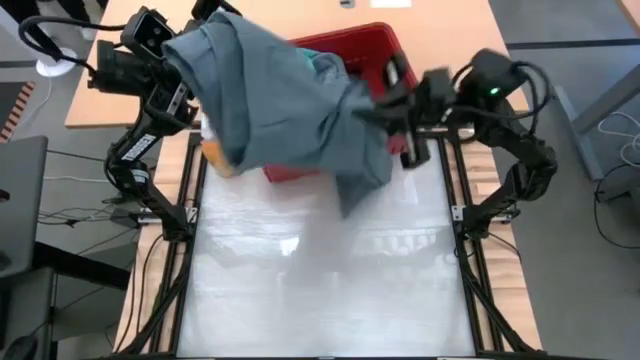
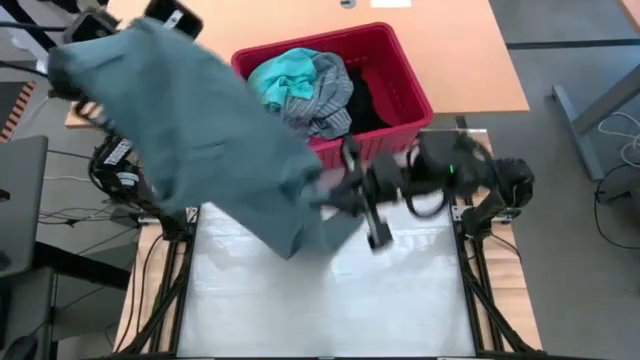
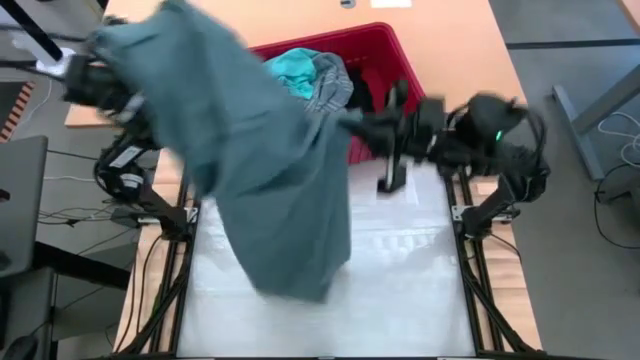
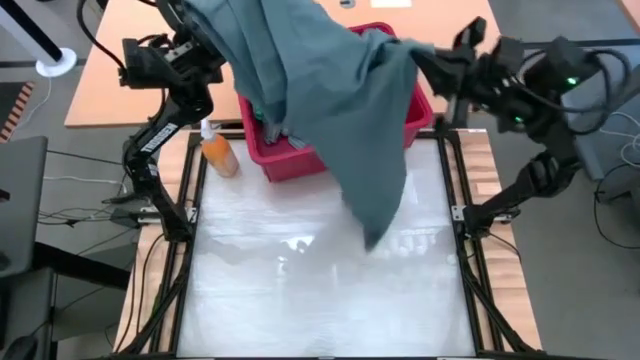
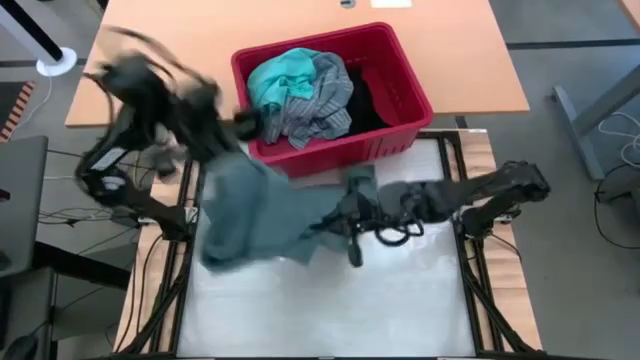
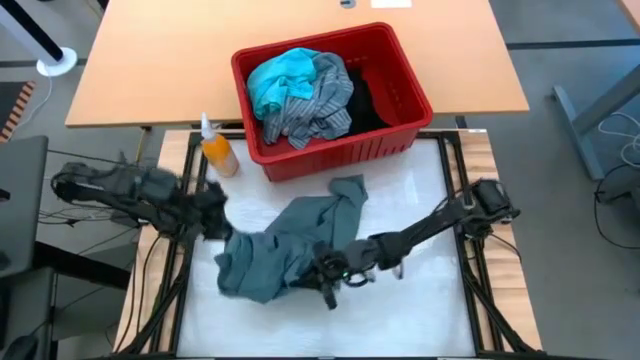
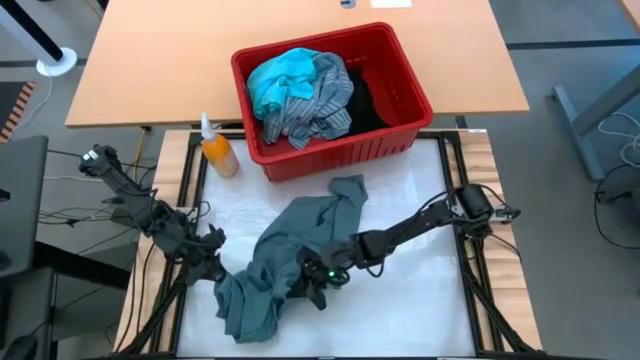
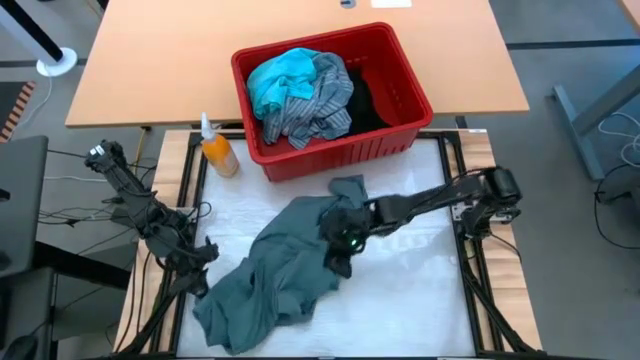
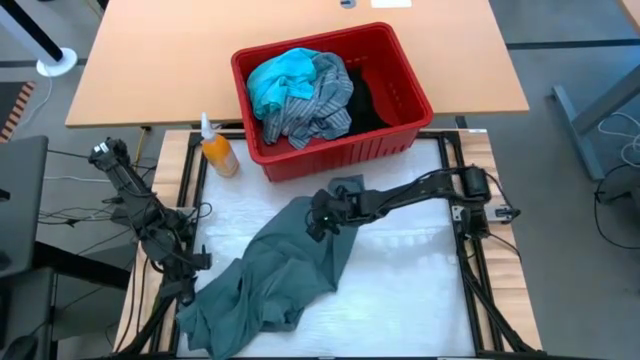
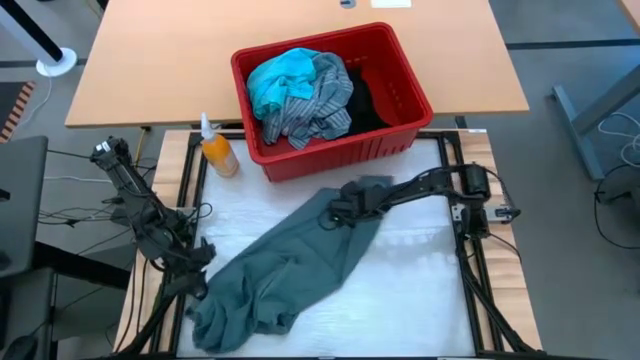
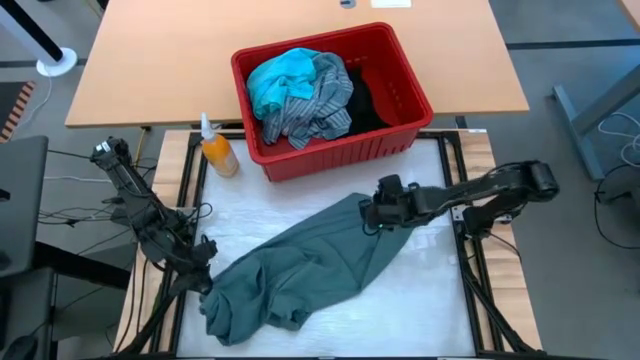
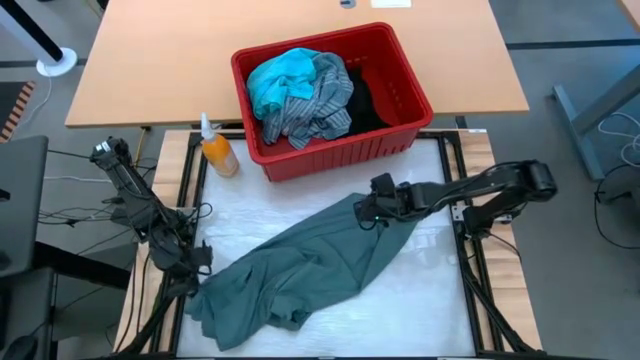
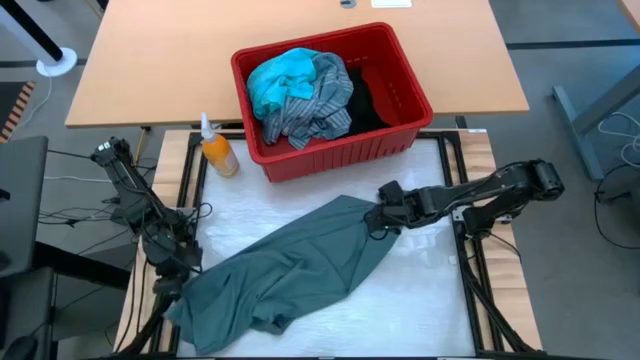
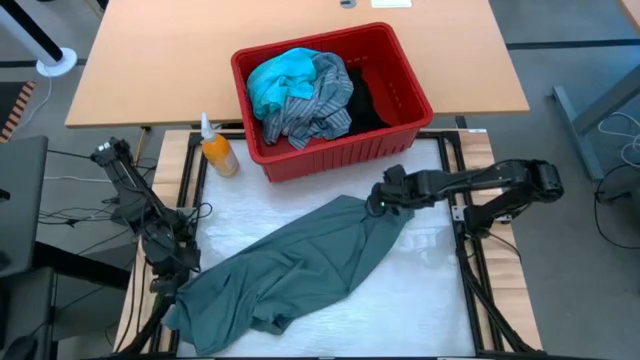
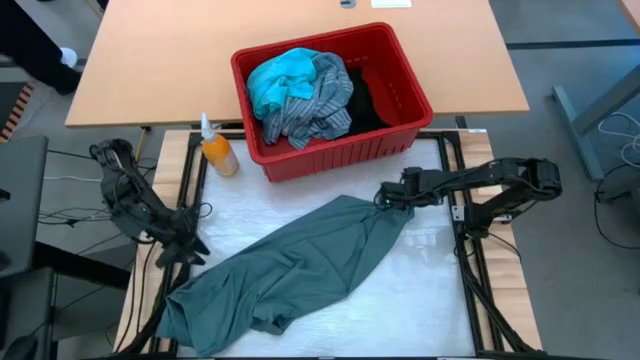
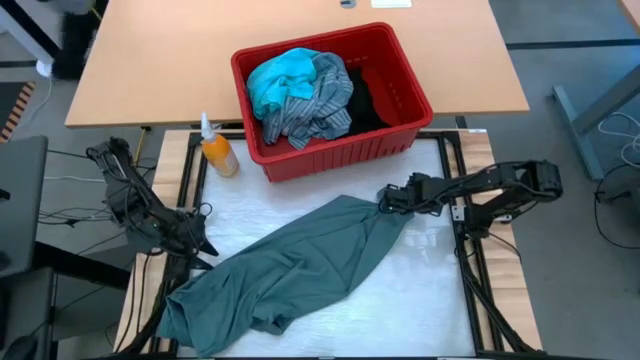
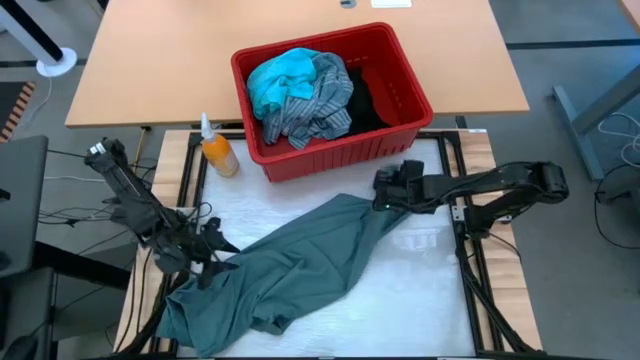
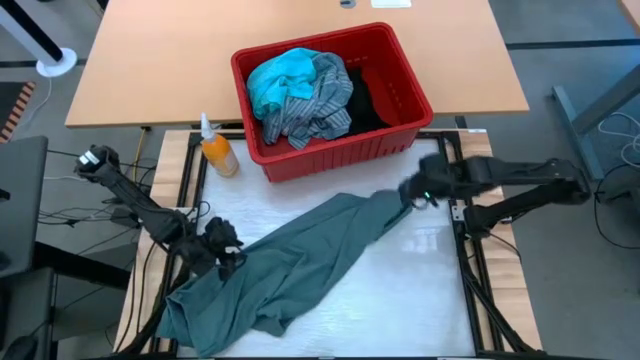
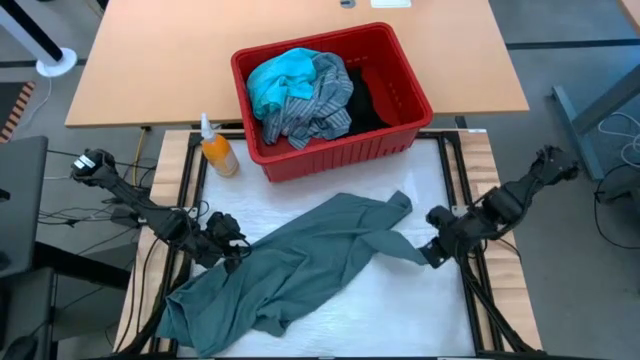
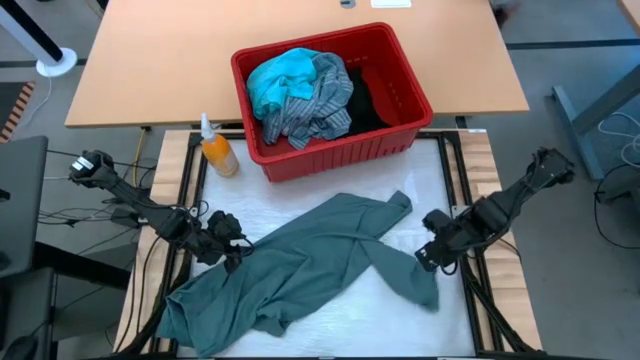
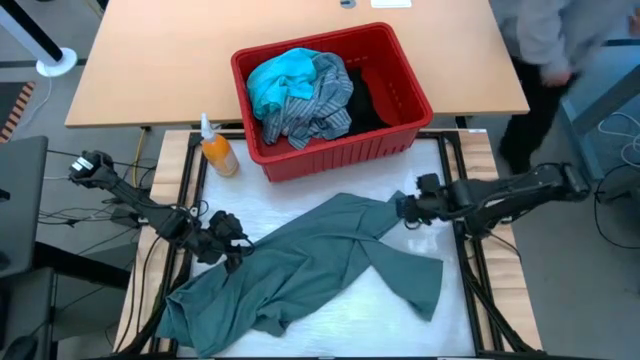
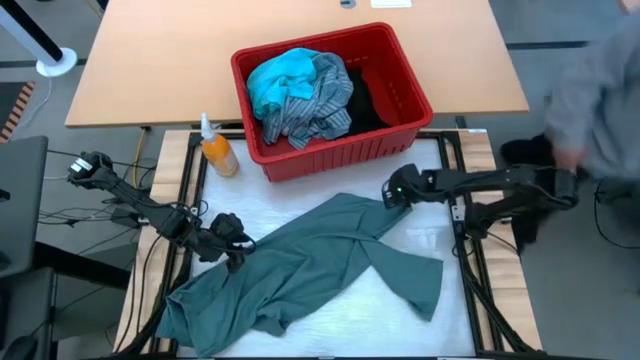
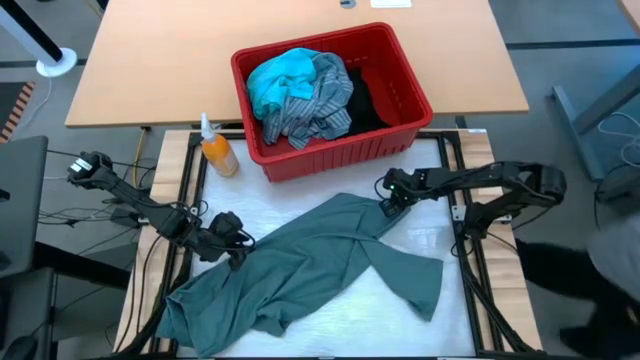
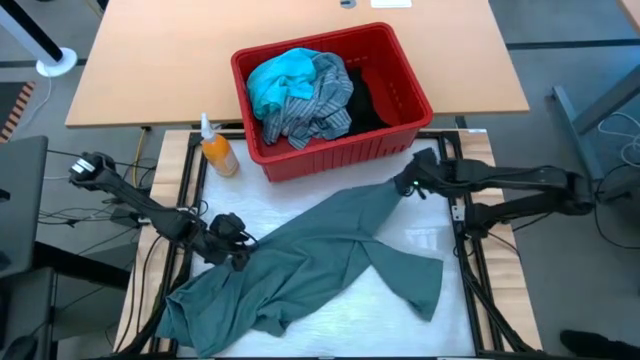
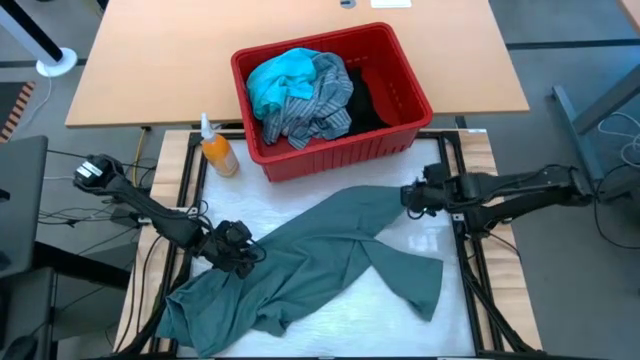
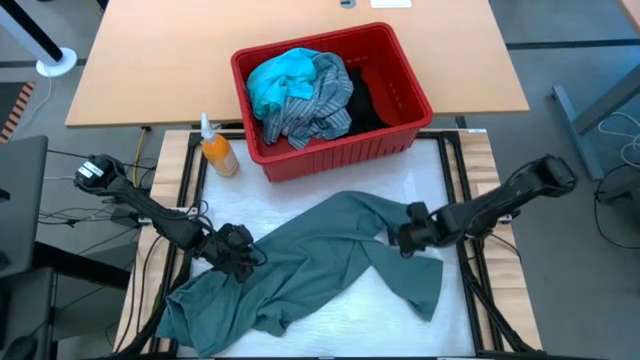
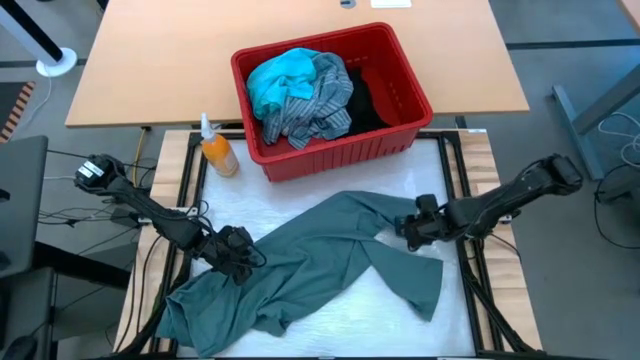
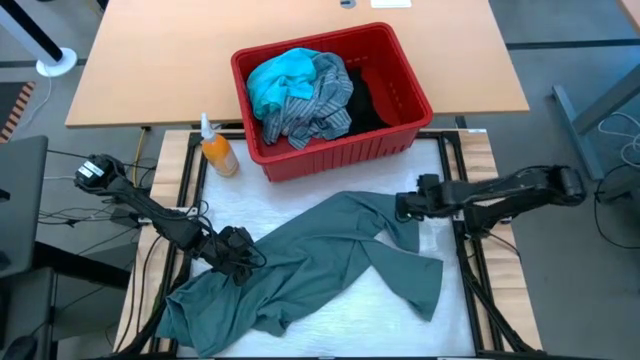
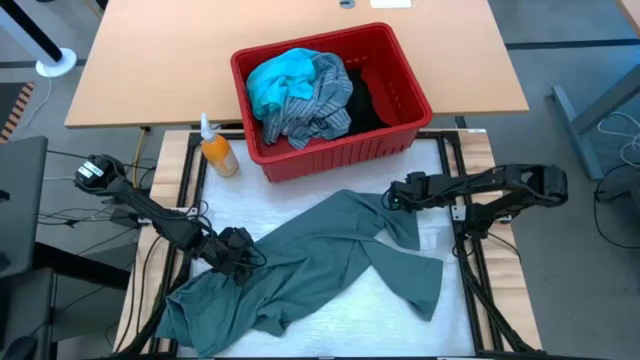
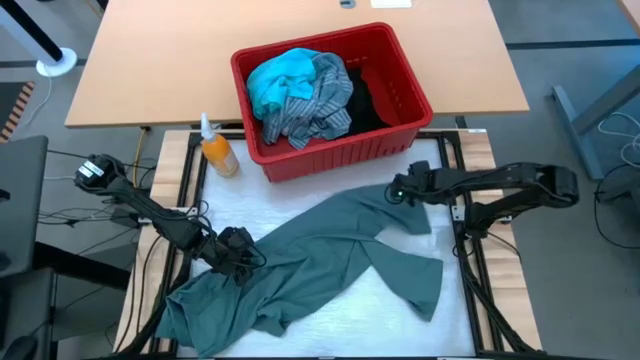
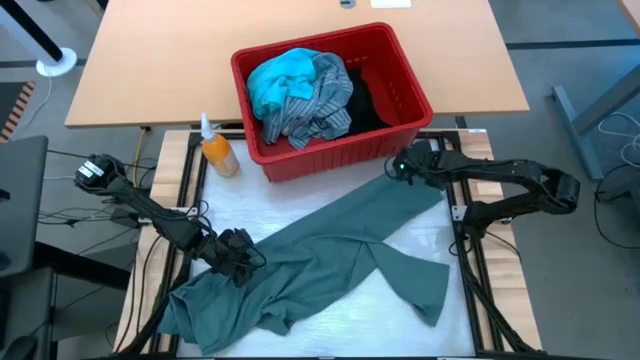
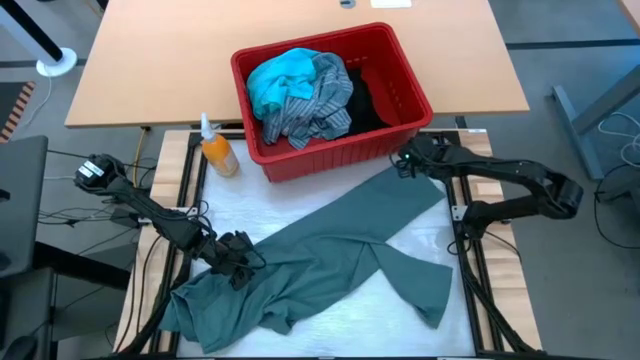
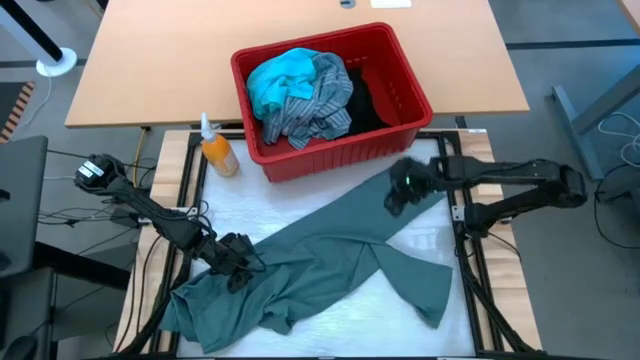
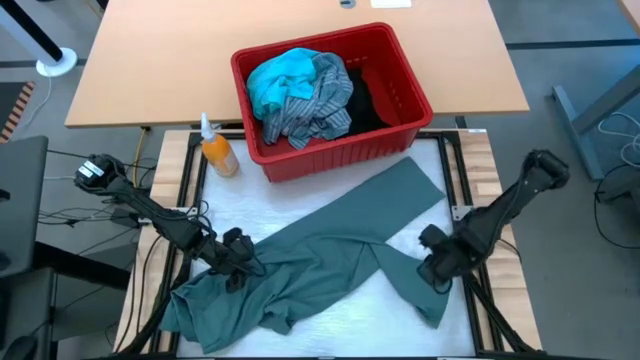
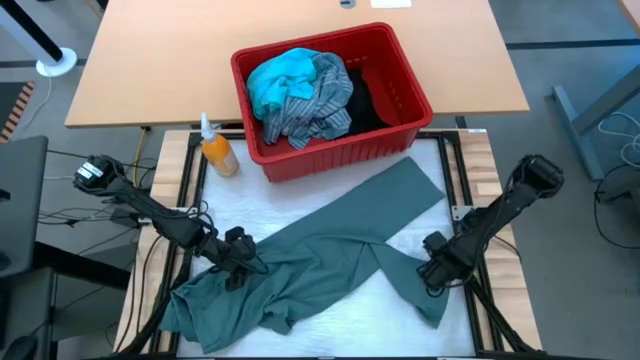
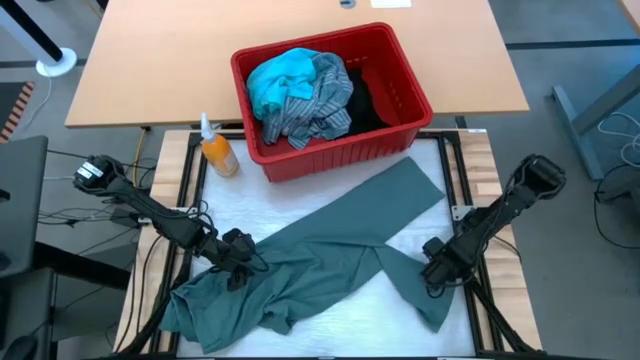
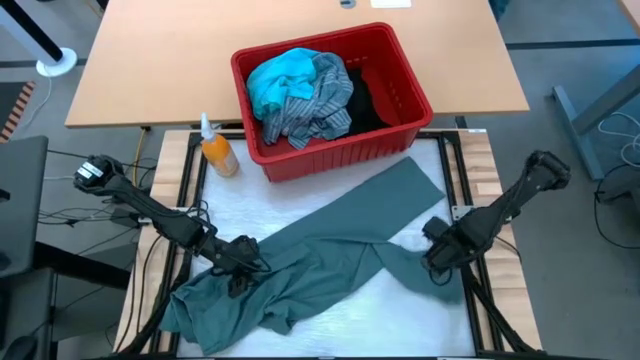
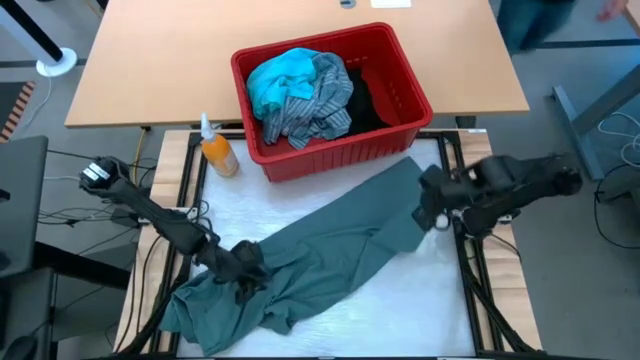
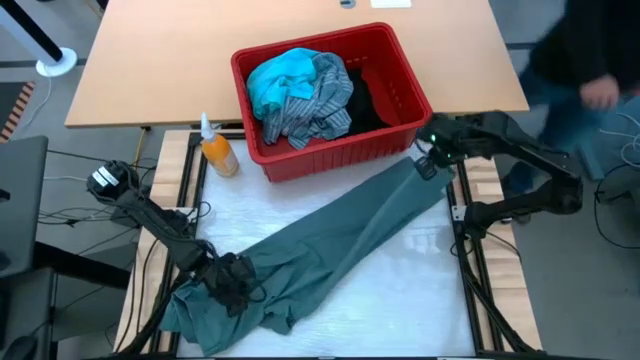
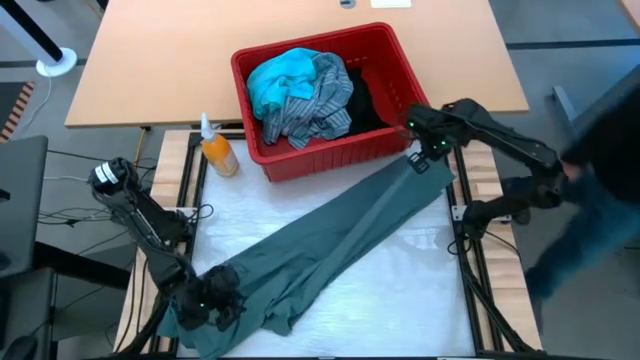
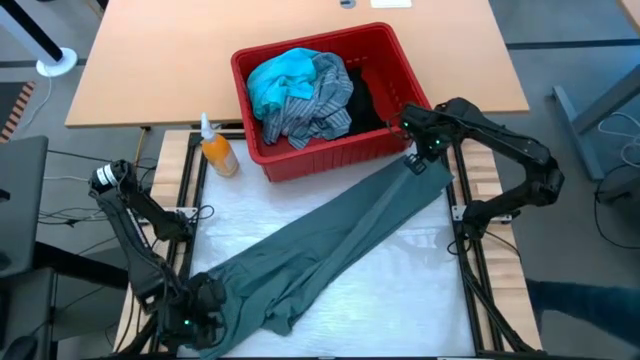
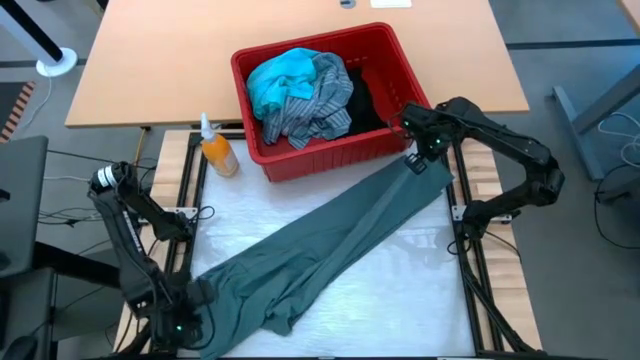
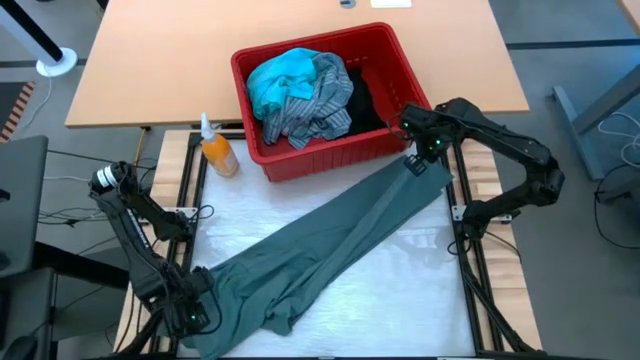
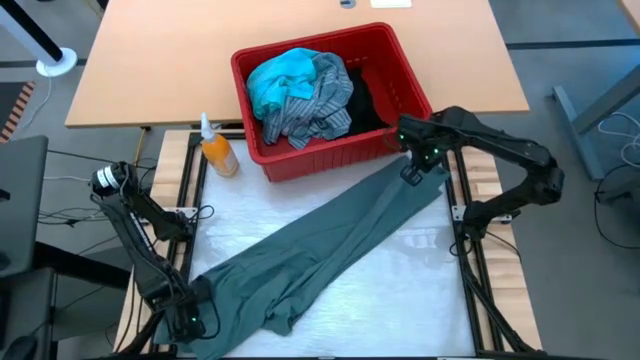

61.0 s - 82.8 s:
Task: Fold Laundry from Bin
Fold the dark blue pants
